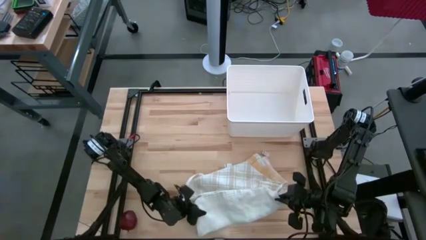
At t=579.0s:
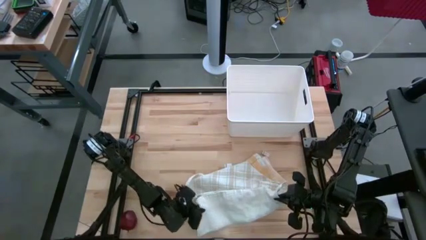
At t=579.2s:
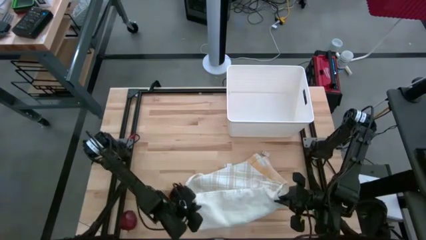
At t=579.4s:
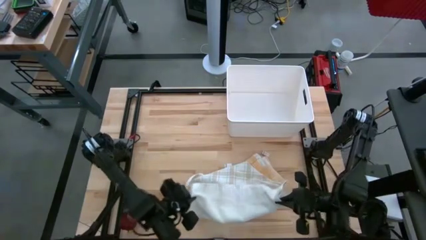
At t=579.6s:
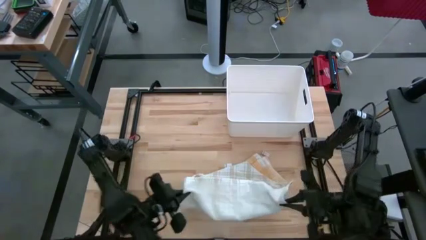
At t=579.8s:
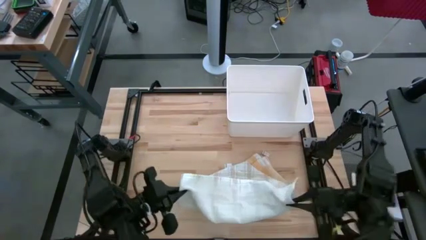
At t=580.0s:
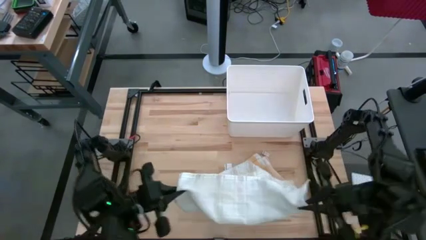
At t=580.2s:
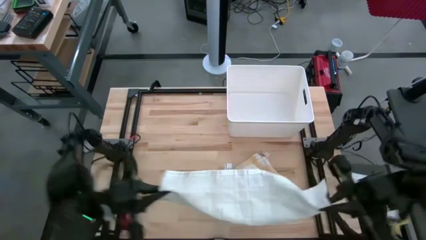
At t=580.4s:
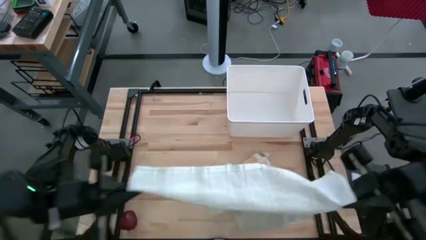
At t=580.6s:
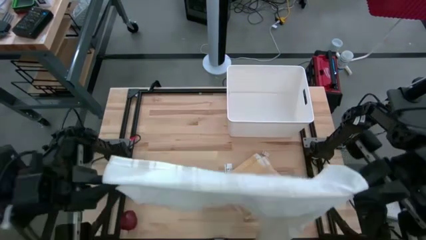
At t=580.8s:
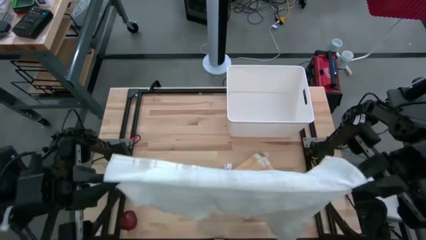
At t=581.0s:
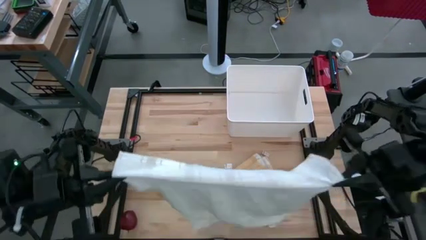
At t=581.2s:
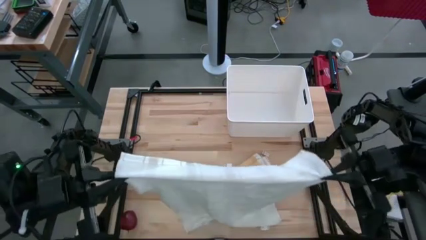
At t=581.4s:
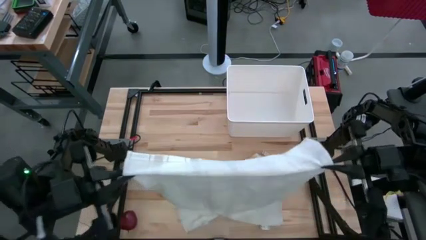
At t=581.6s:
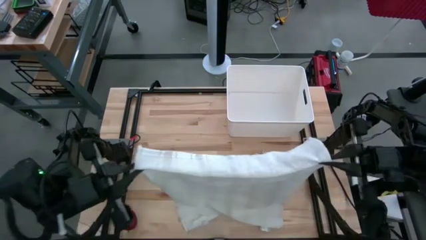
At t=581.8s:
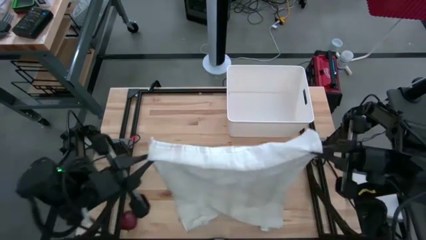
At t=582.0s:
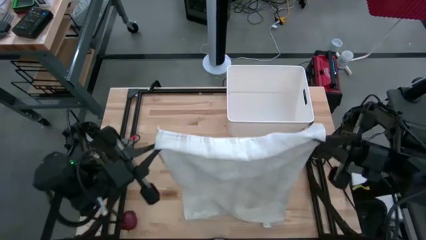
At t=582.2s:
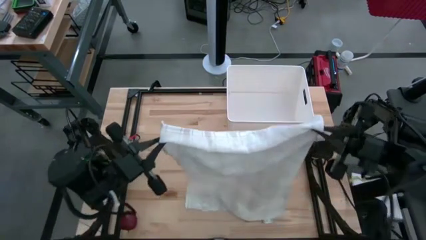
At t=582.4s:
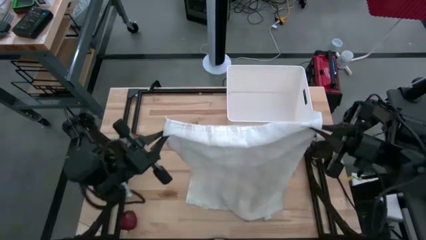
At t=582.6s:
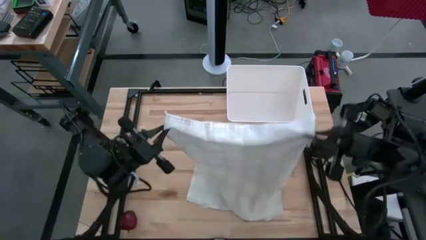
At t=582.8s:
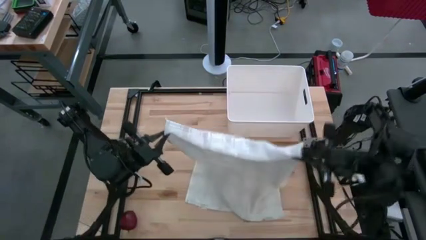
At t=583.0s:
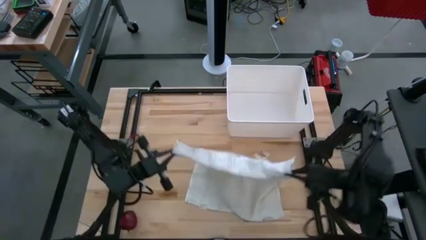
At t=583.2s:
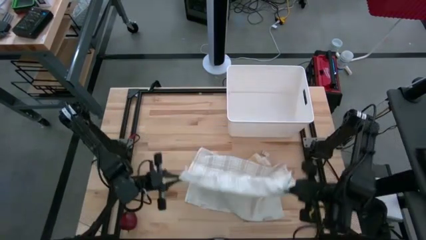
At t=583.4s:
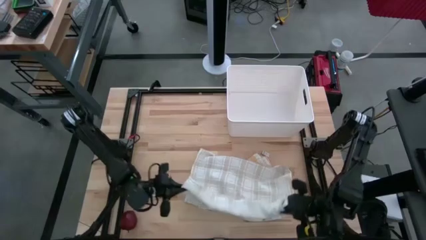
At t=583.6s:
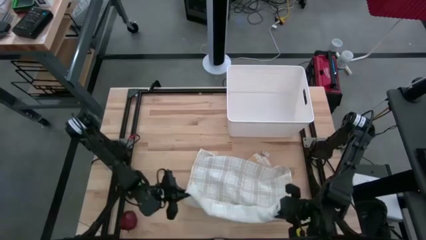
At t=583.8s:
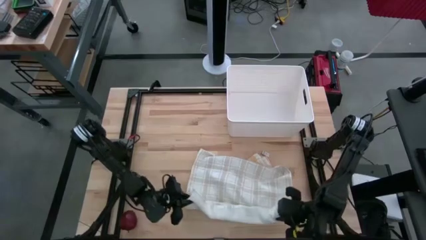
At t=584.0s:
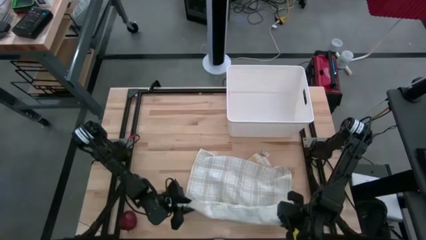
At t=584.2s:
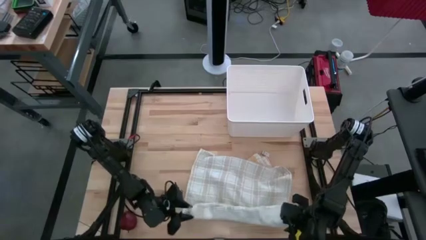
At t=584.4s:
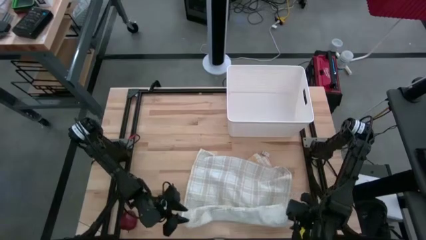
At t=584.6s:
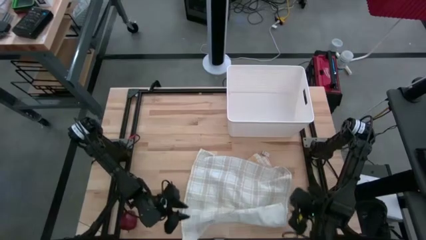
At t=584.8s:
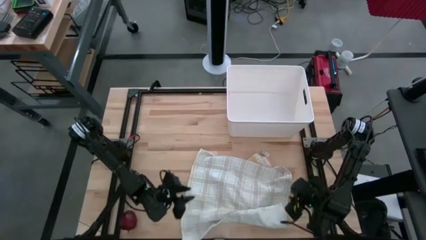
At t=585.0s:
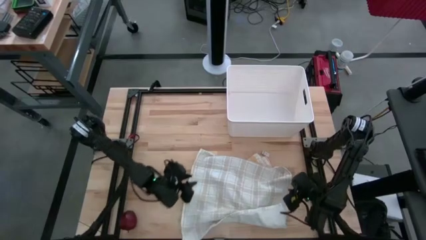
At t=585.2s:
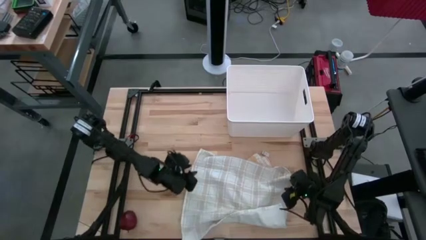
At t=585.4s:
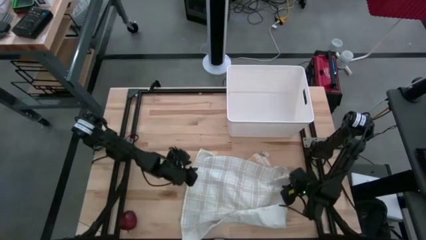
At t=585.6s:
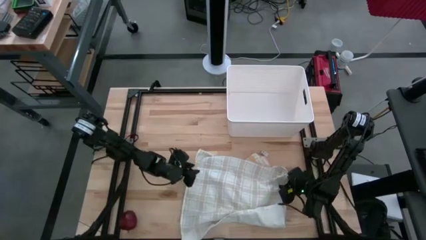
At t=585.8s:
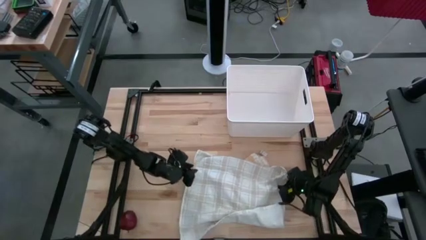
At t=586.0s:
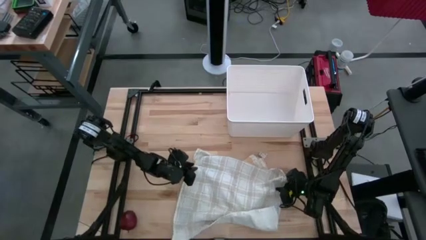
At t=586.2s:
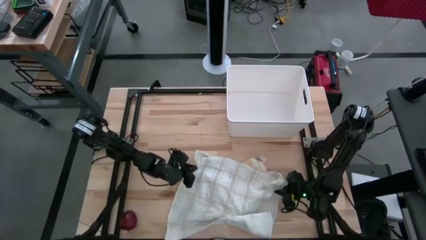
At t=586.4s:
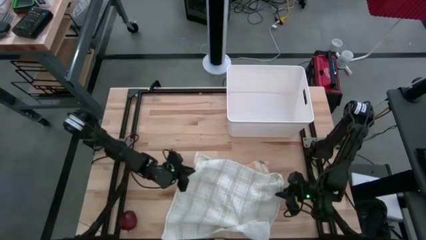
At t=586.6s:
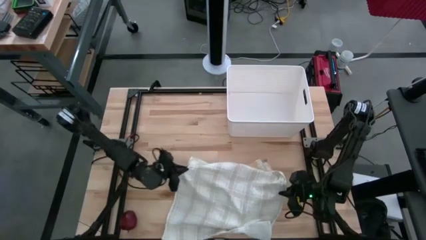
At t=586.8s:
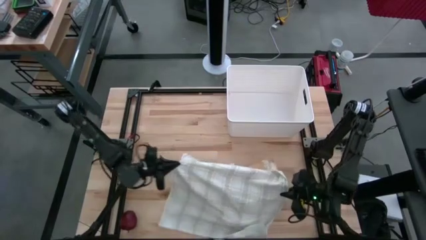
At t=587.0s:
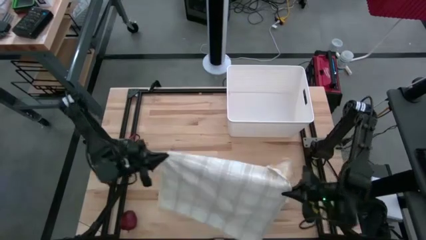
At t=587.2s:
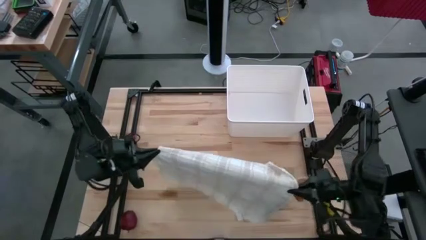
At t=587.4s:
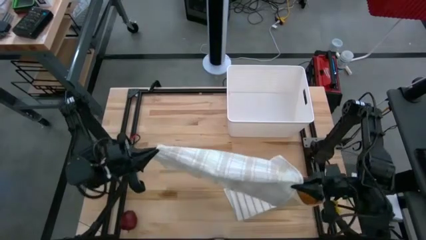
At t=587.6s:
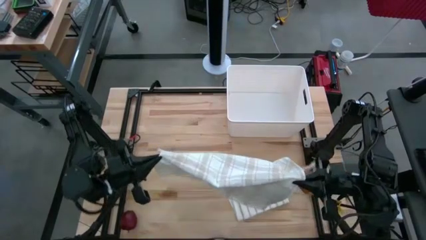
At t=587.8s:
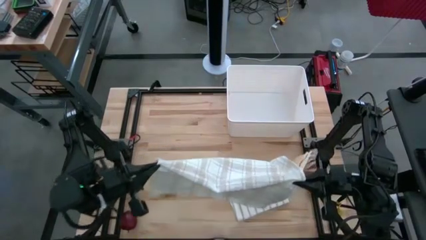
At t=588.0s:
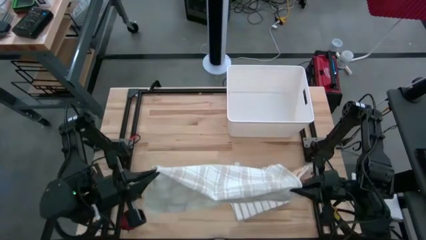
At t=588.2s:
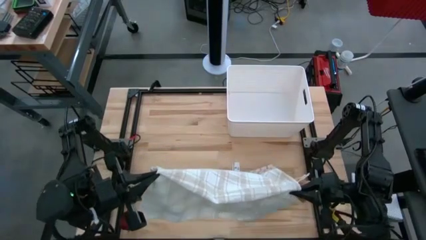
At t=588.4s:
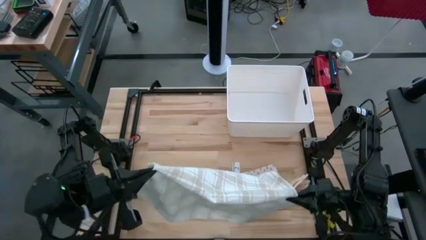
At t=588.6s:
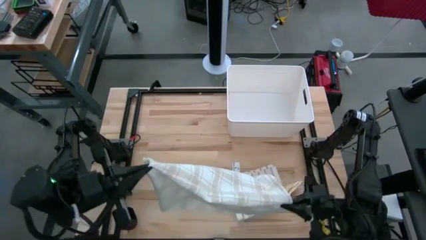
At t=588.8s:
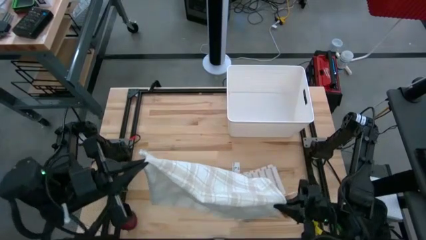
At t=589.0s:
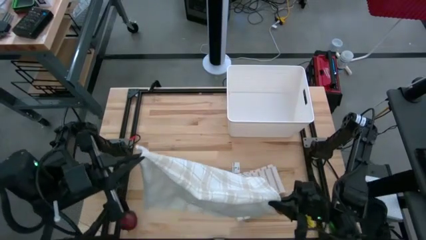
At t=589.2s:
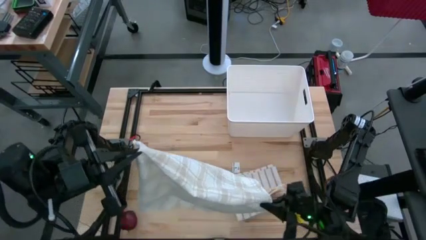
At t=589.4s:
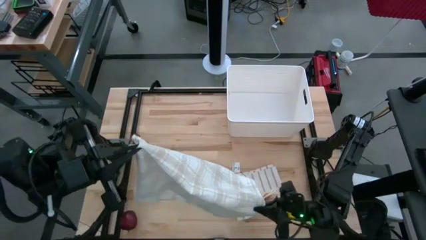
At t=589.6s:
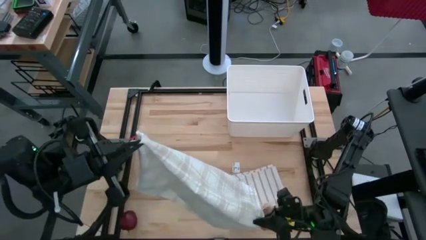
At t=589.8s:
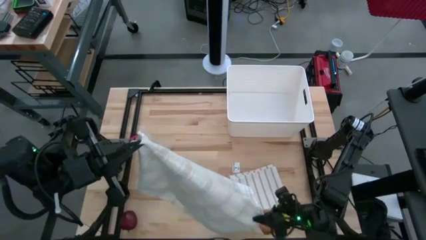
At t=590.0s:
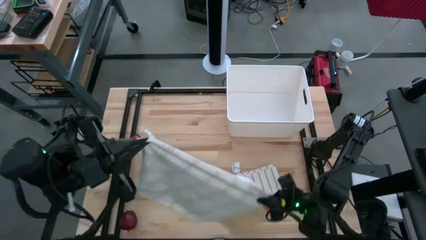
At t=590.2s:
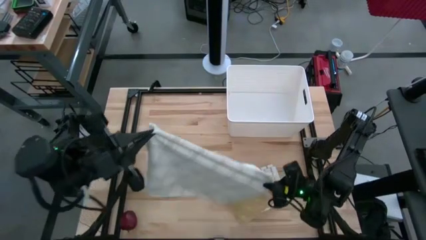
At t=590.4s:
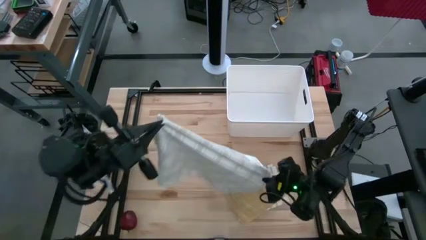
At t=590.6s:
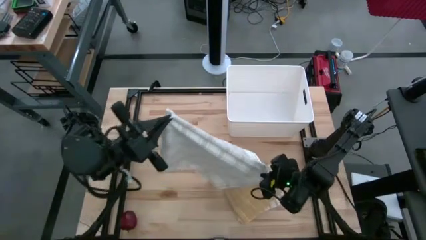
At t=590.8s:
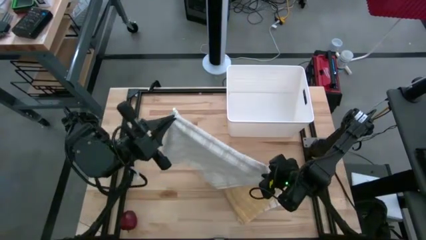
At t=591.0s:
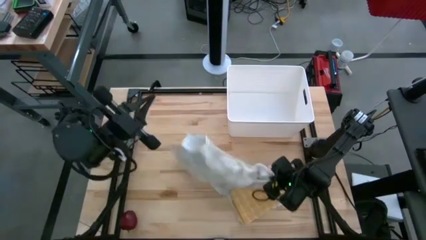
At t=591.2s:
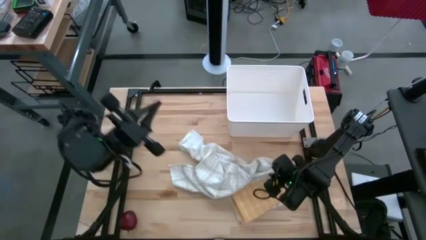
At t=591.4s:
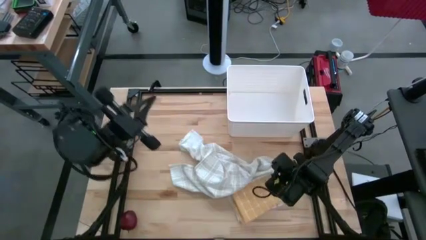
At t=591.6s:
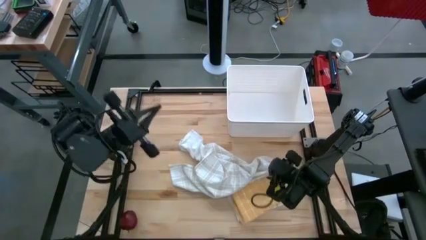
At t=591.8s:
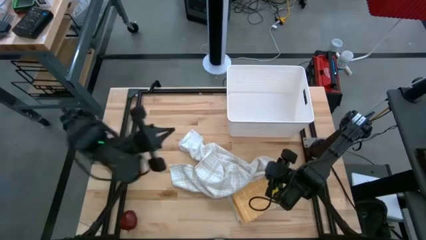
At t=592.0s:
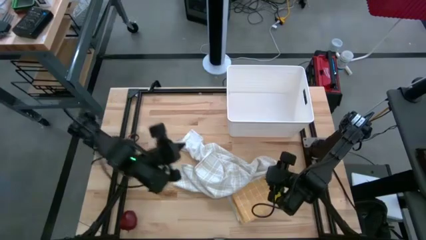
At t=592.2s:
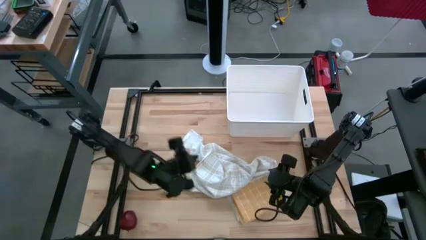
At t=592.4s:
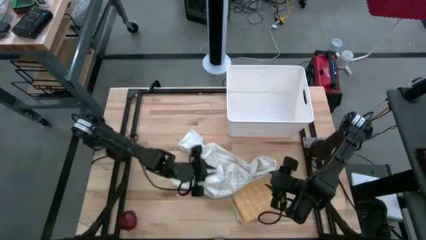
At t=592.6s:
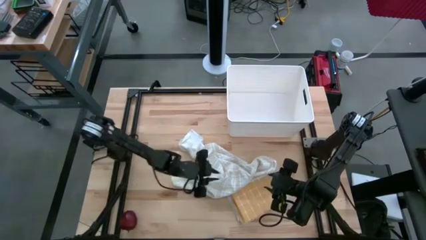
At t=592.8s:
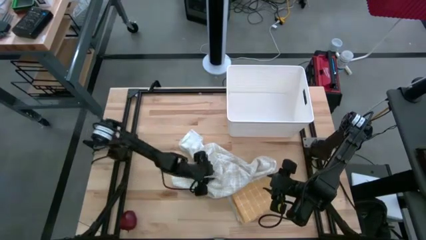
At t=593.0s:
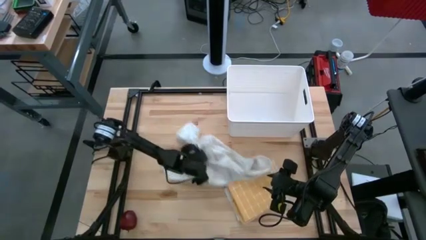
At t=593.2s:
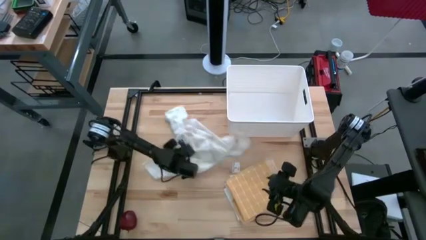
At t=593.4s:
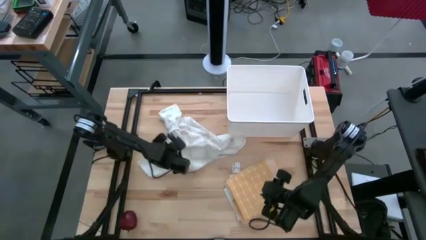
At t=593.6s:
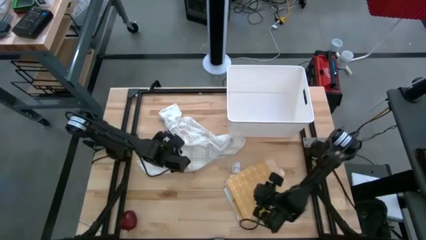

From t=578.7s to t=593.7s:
Task: Fold towel
Fold the white checkered towel

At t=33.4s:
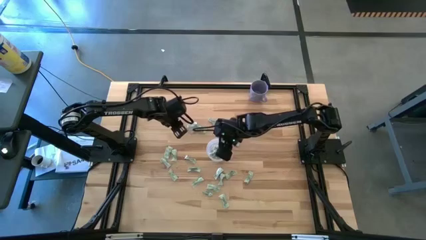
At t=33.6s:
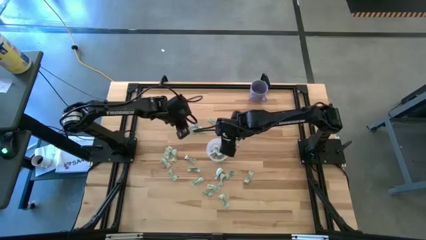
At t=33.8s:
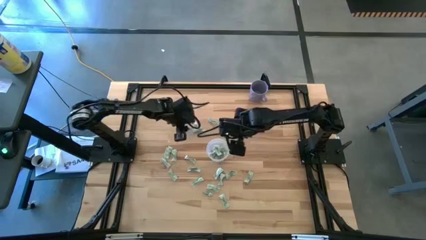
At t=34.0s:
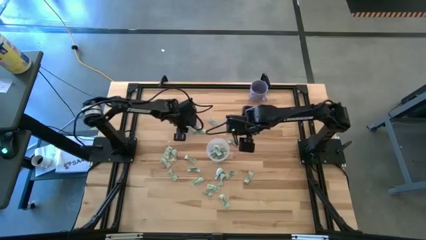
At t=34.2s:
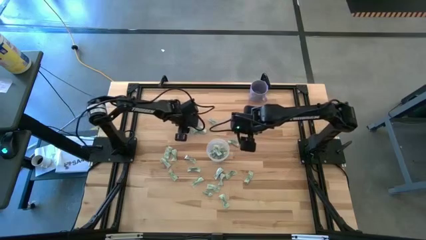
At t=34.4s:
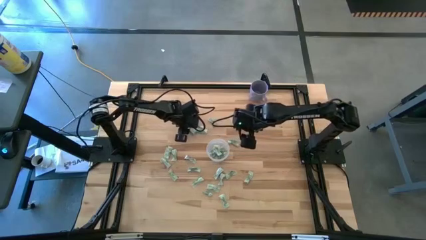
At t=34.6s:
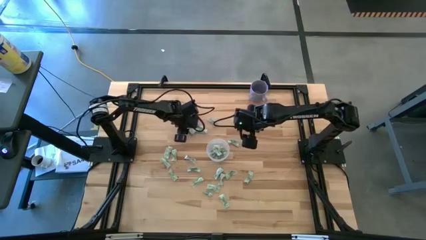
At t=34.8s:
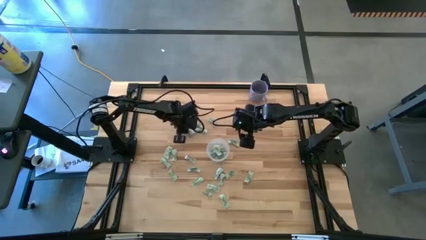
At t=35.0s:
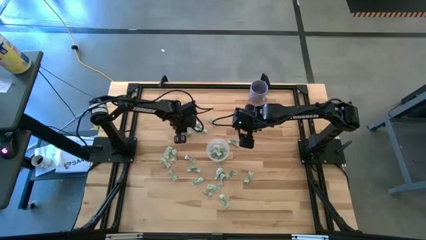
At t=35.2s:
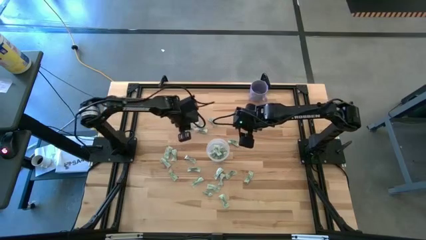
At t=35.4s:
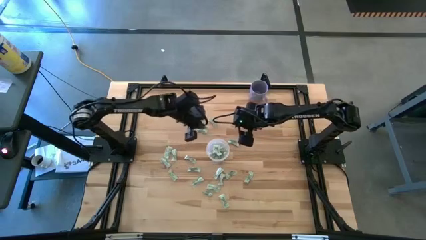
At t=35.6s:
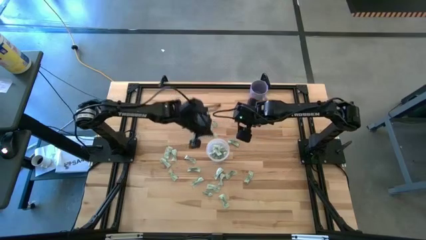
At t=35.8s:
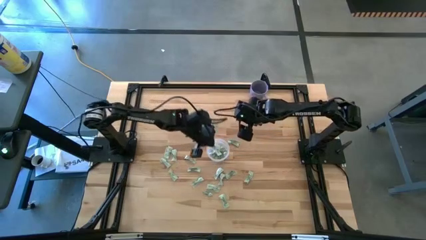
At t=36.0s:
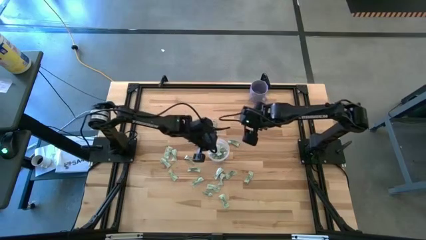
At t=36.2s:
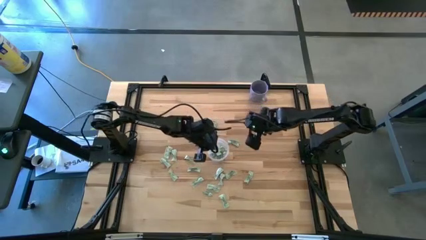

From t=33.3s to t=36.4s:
Task: Pick and place Stevia / Truvia into bins
Put the green stevia packet into the transparent container
